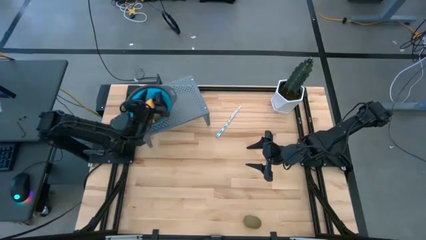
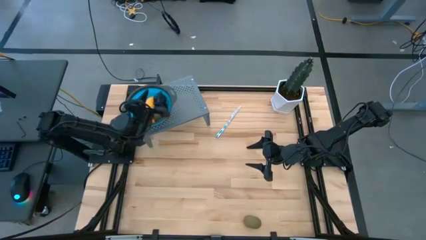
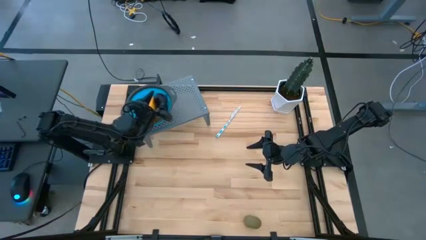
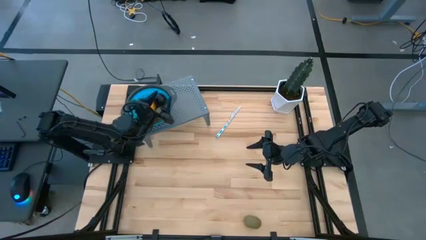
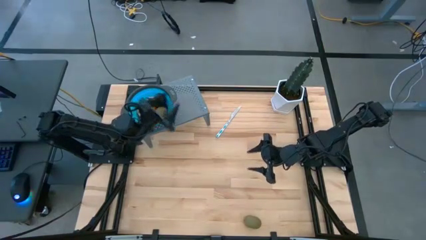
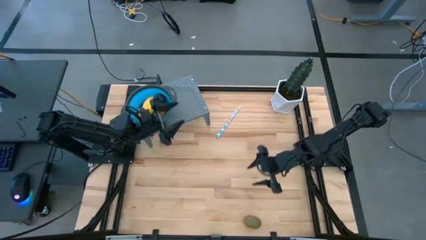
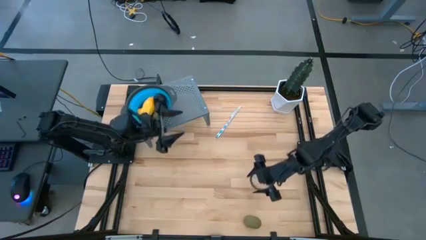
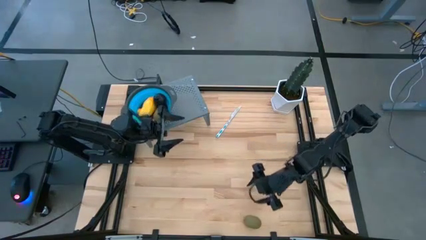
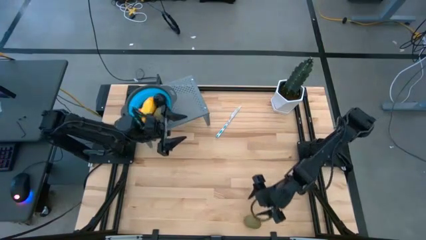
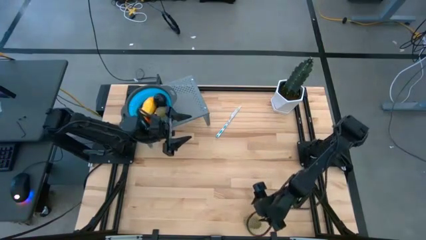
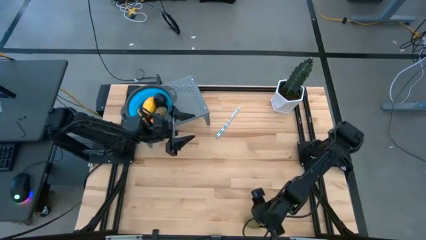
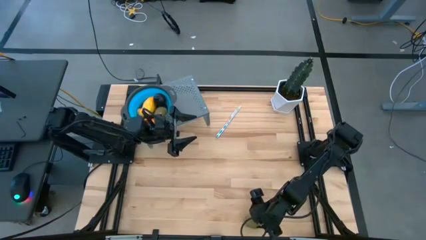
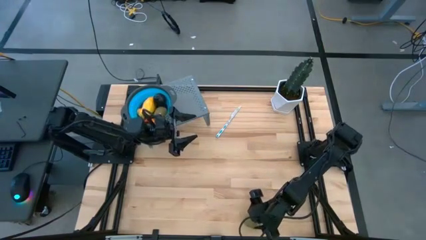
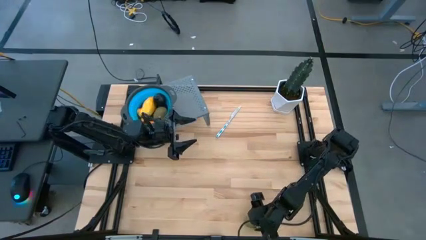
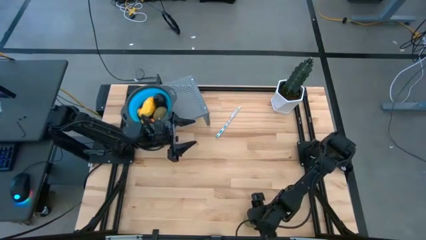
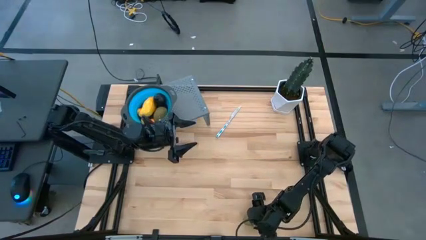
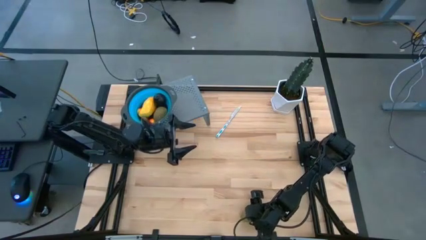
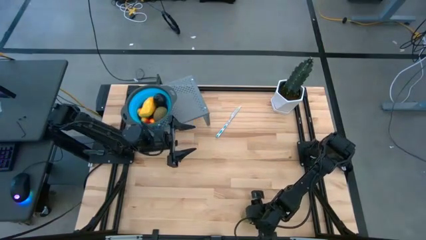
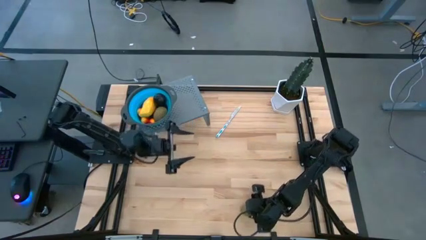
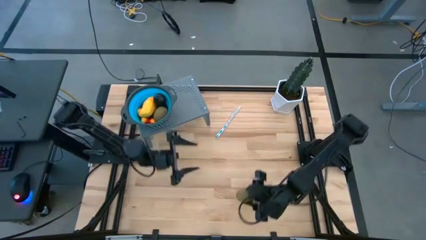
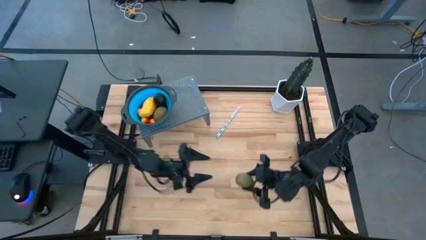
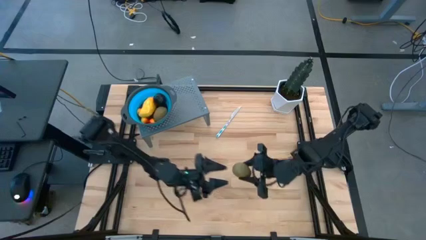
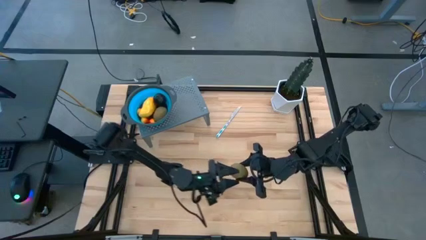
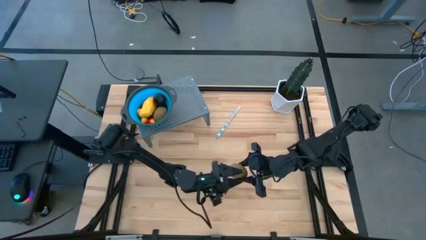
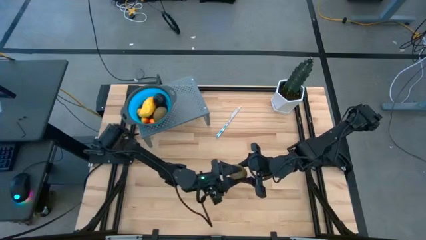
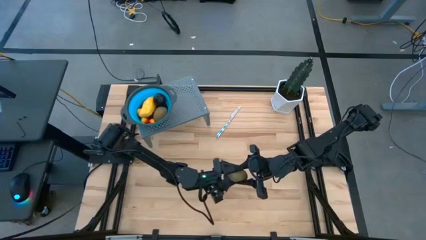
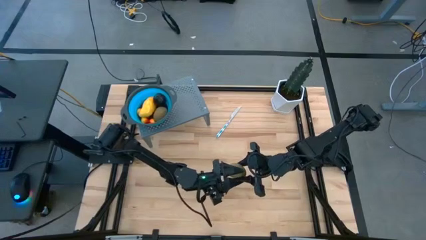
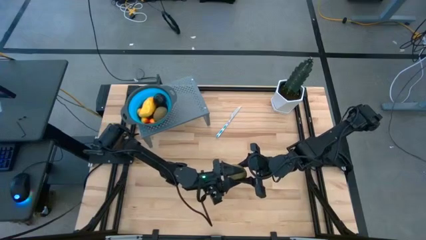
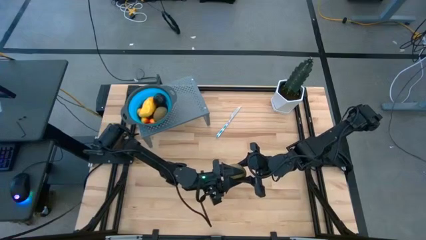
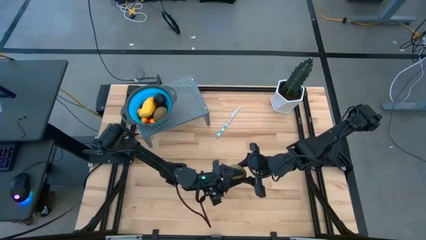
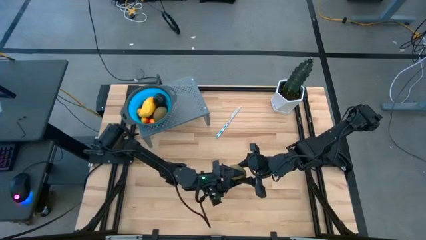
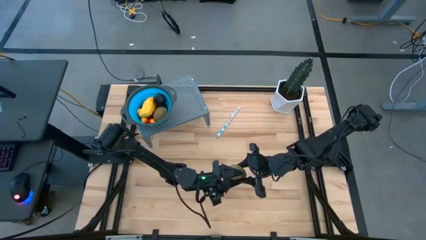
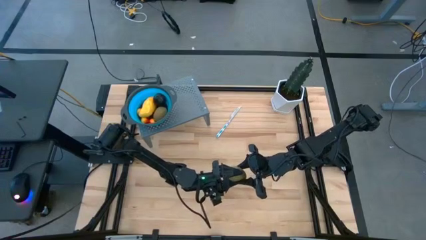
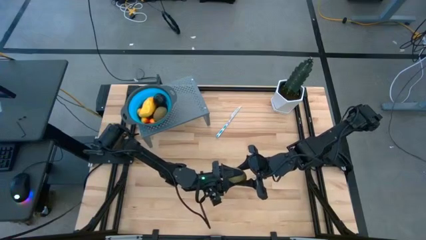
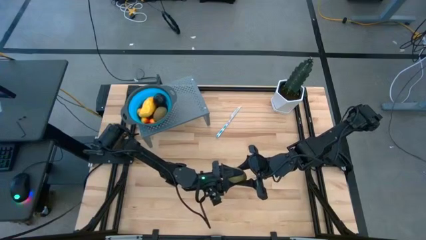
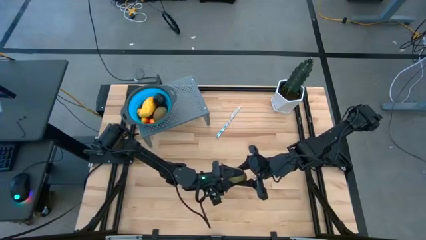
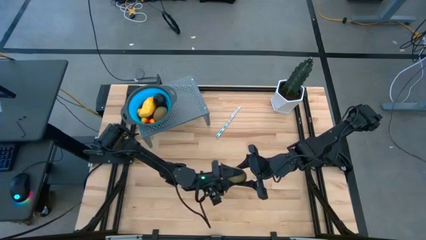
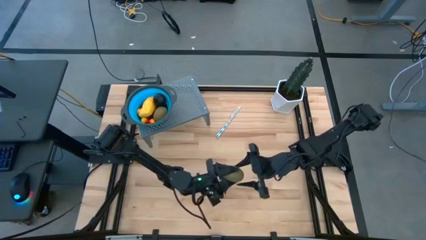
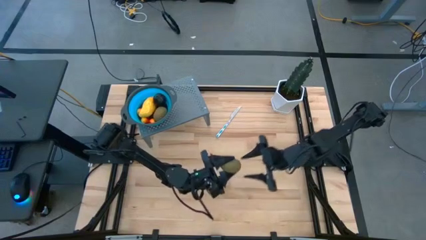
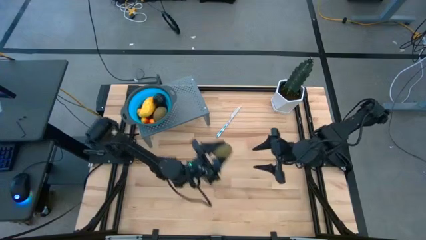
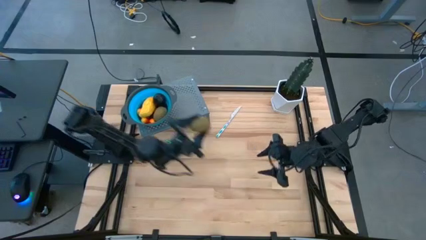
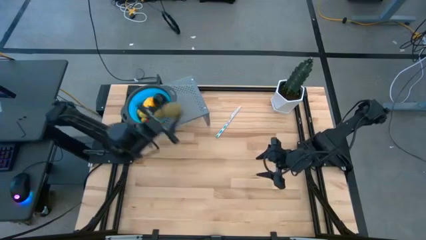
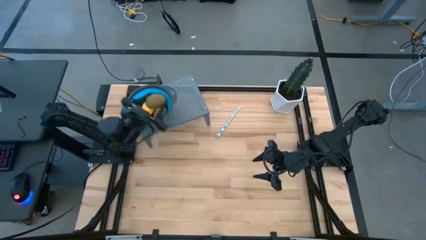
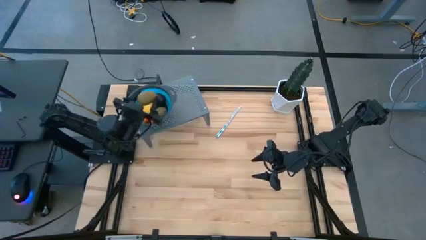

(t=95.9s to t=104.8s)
Task: Pick & Place Fruit
Put the brown kiwi into the blue strainer bowl

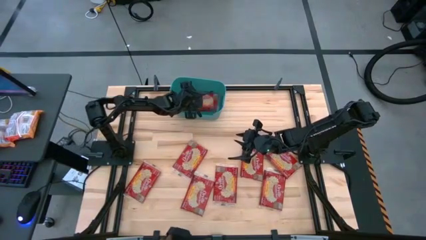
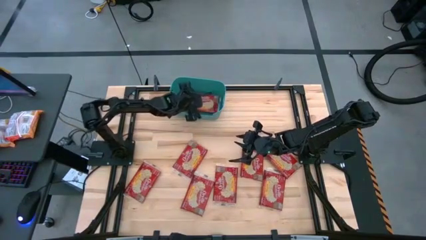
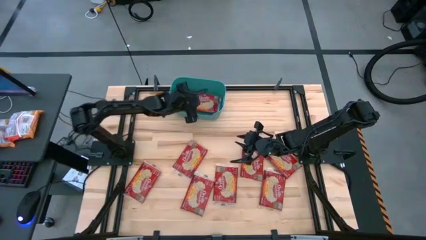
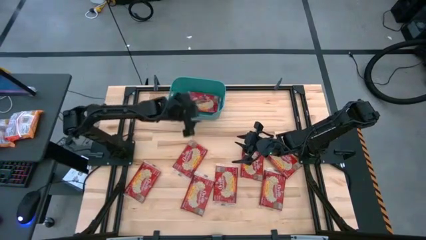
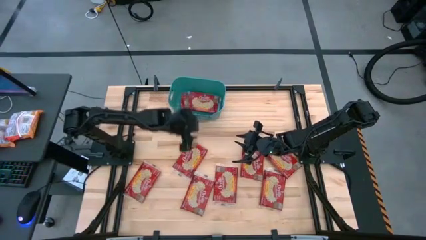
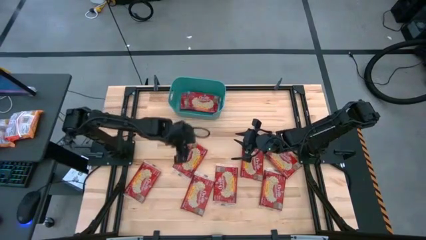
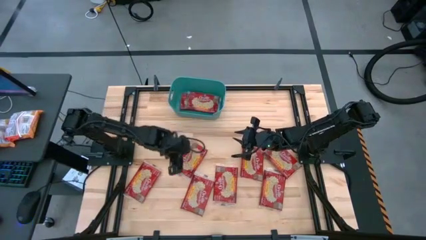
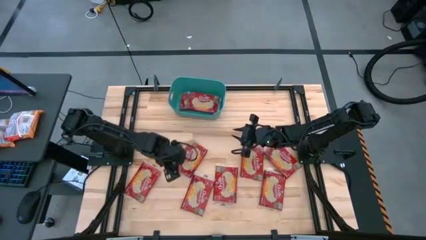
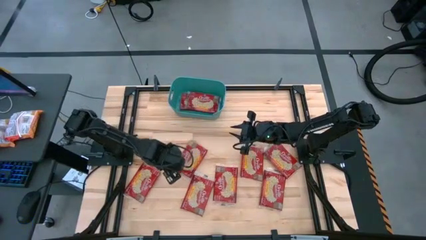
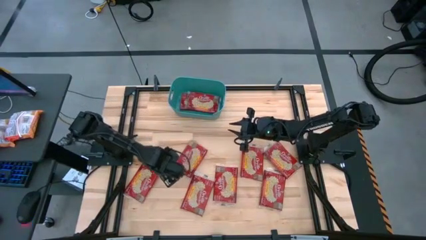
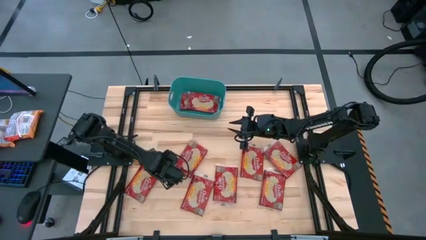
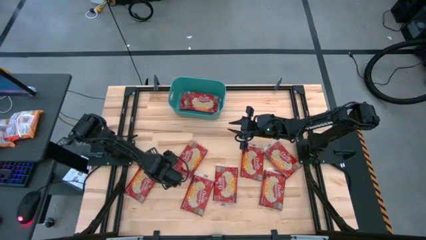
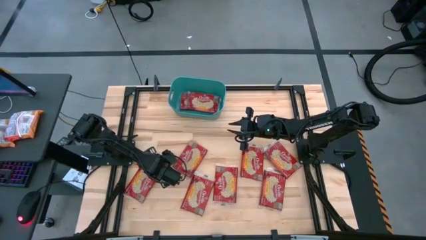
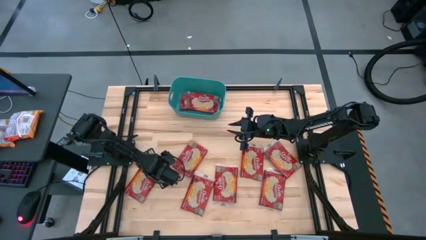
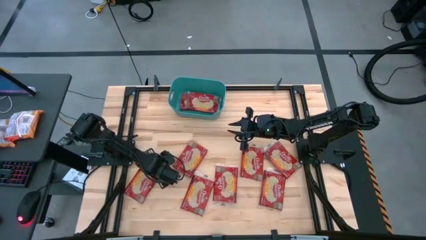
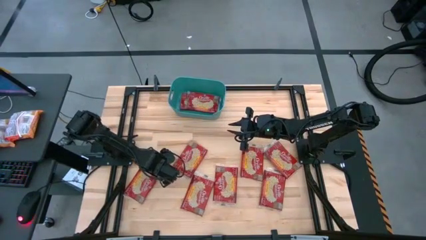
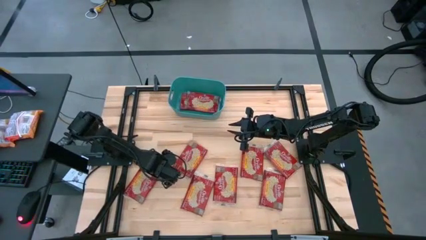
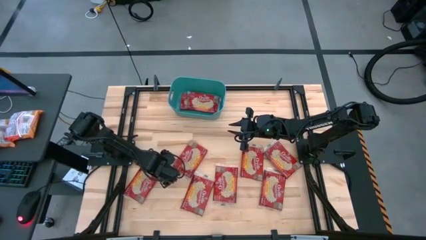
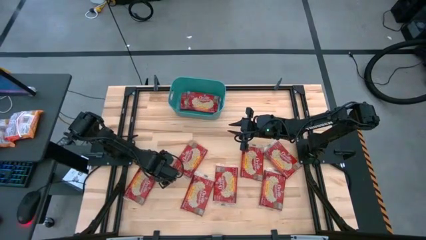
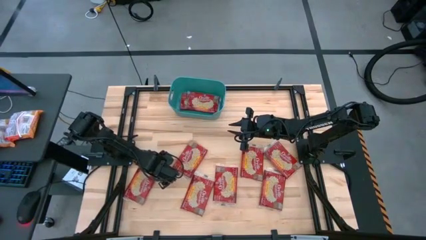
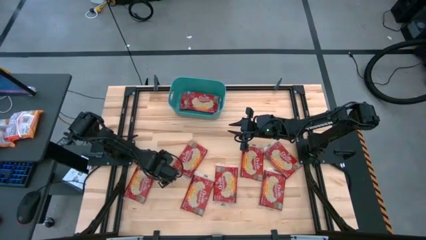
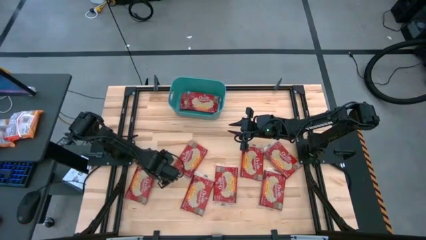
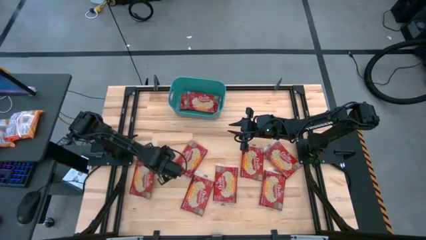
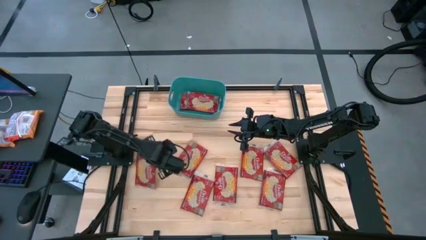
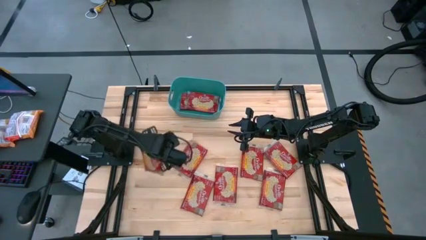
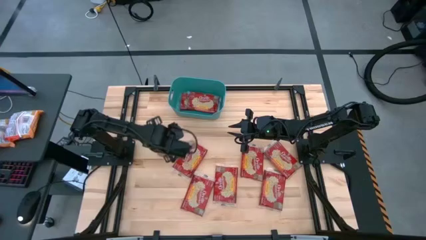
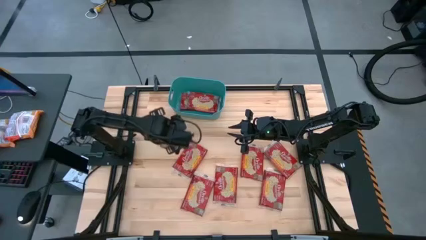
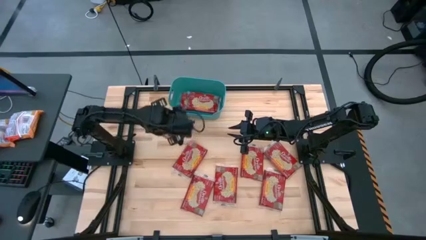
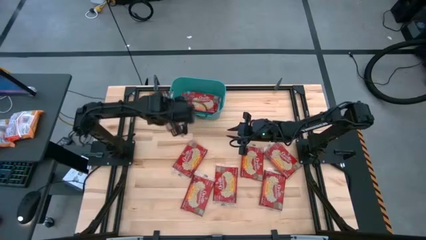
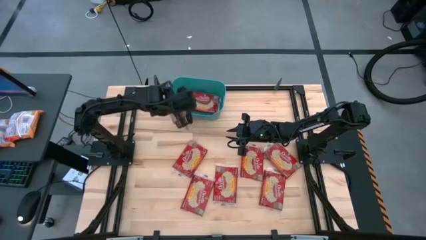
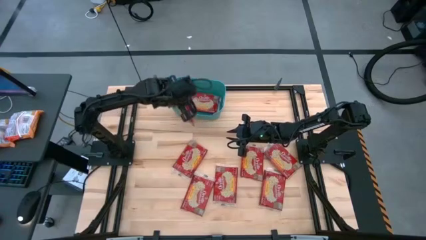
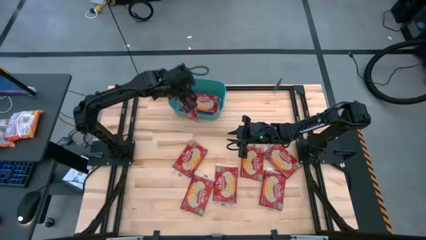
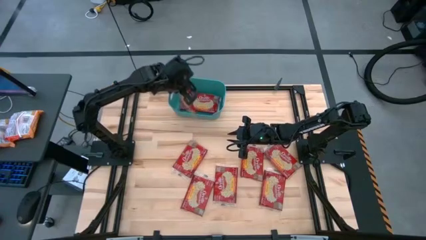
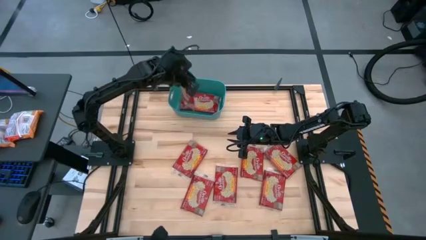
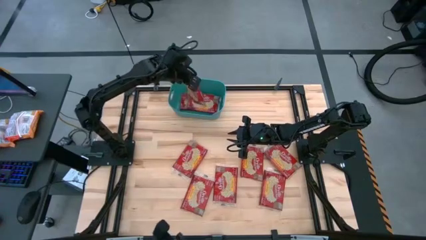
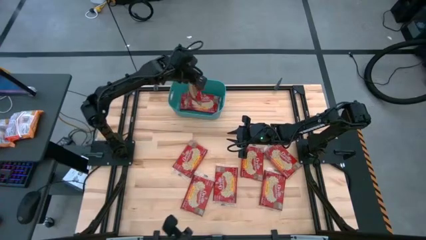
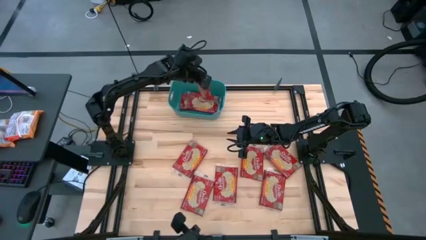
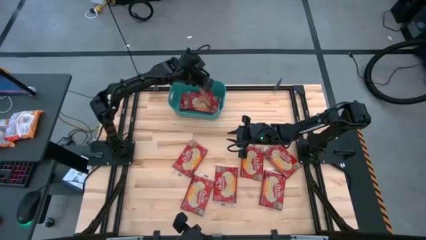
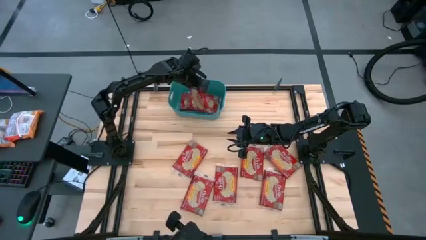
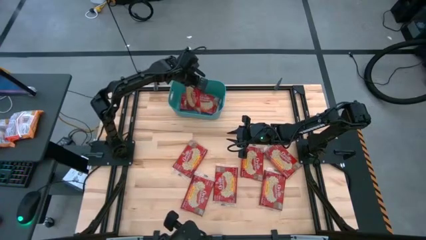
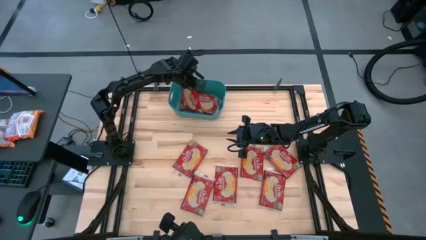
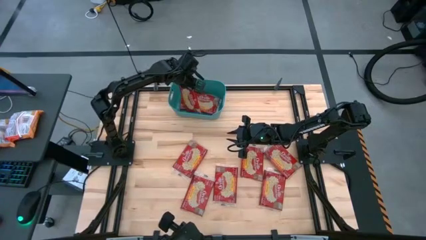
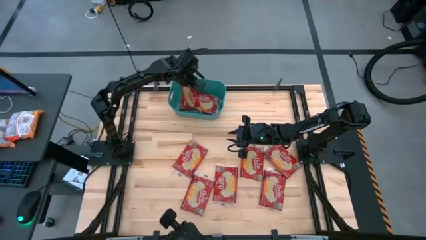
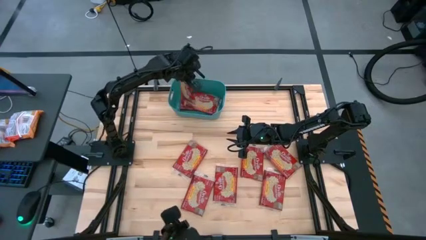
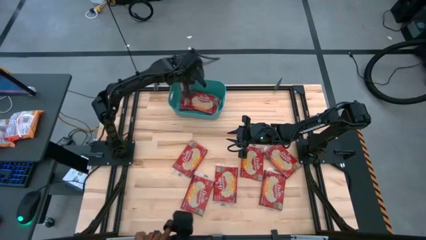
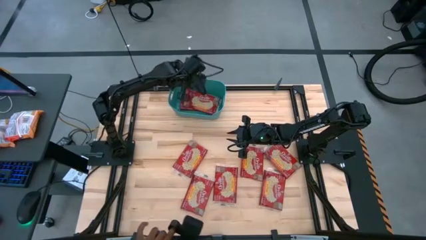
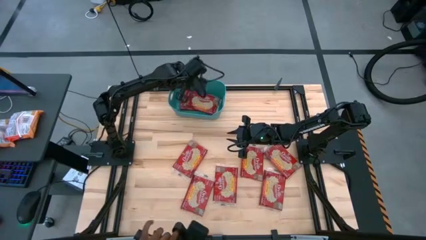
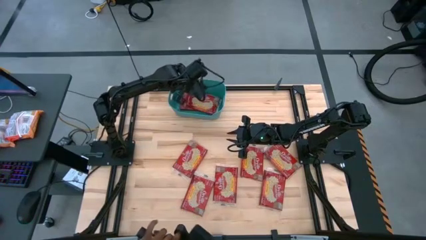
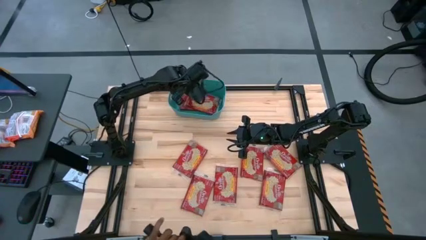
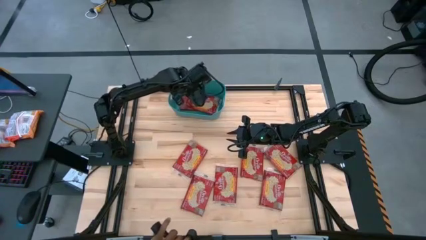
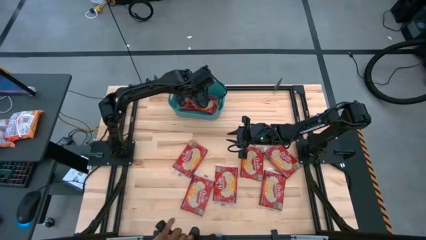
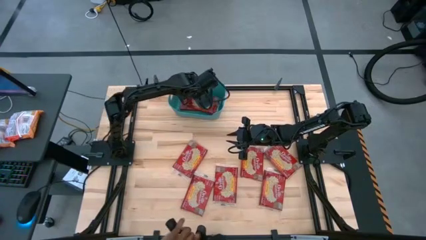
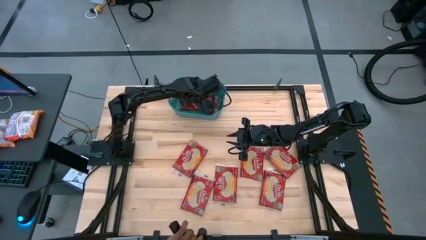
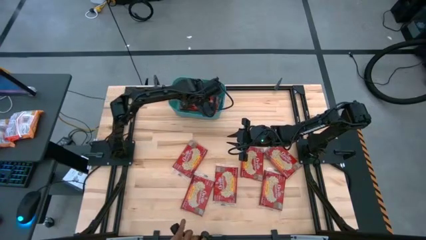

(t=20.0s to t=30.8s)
Task: Sort popcorn bags into baskets
Put the red popcorn bag into the green bin
